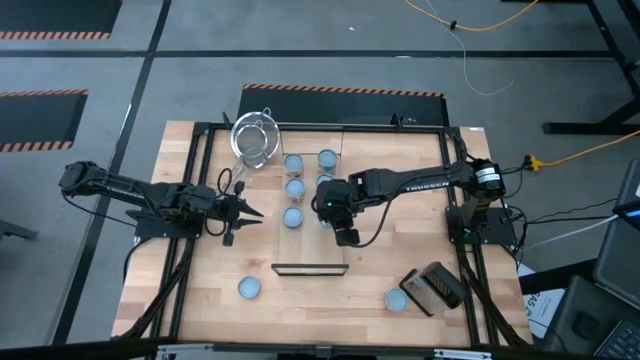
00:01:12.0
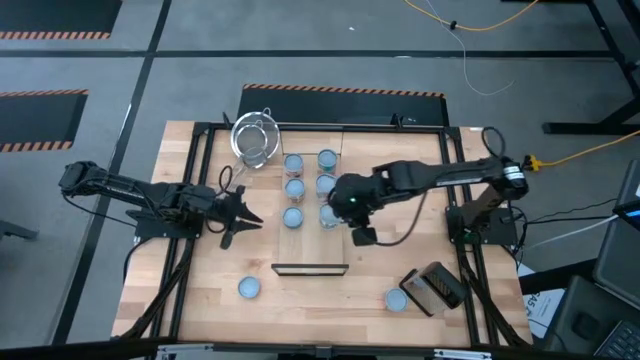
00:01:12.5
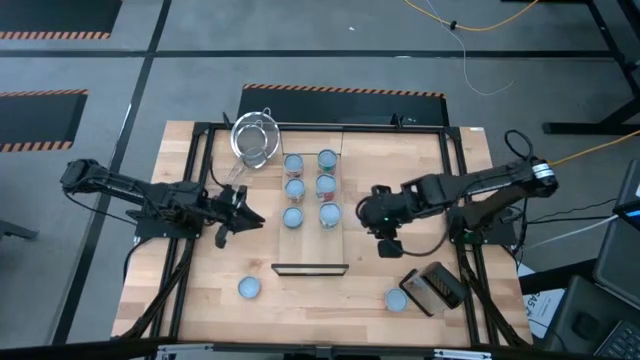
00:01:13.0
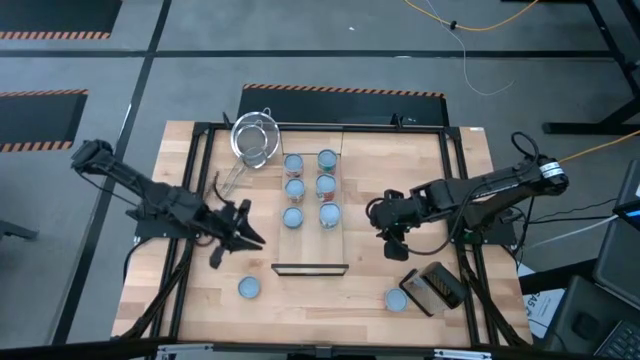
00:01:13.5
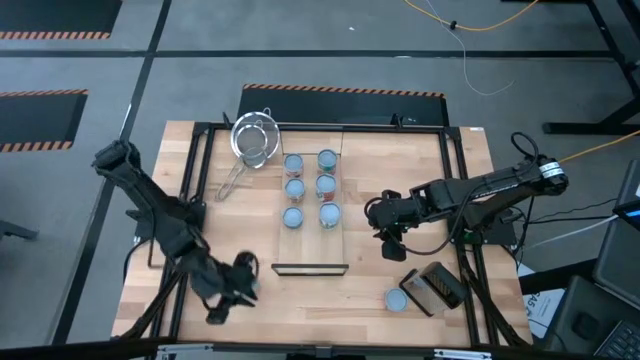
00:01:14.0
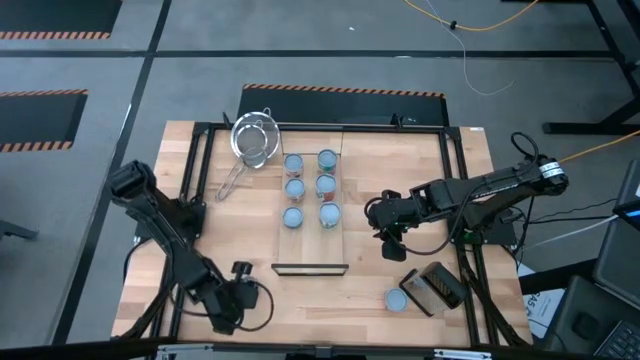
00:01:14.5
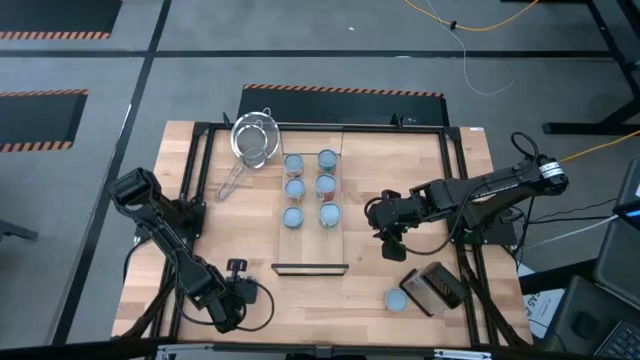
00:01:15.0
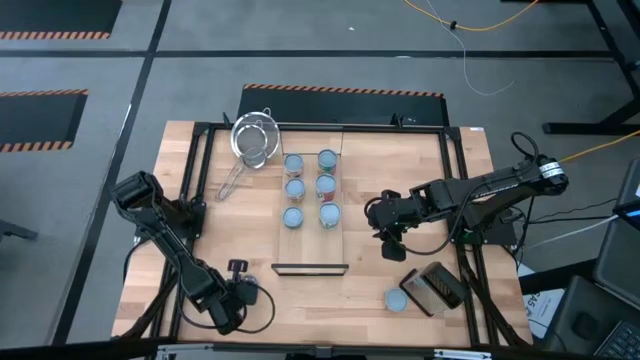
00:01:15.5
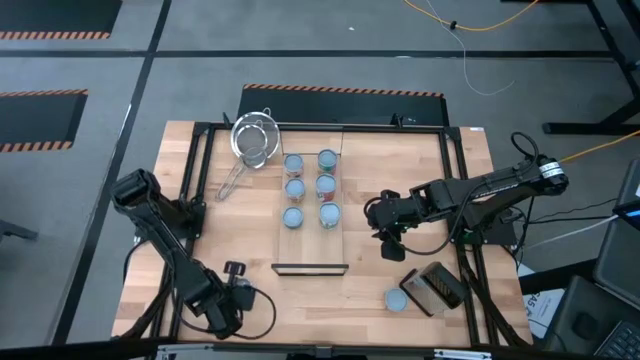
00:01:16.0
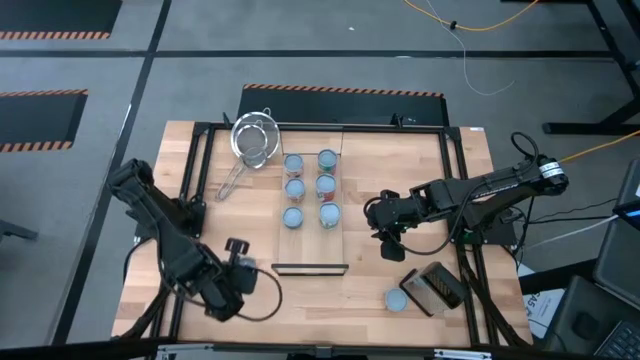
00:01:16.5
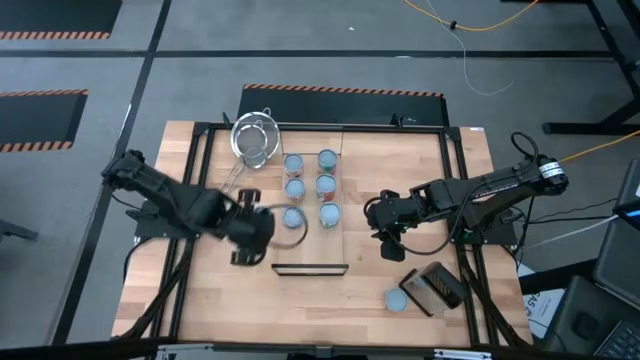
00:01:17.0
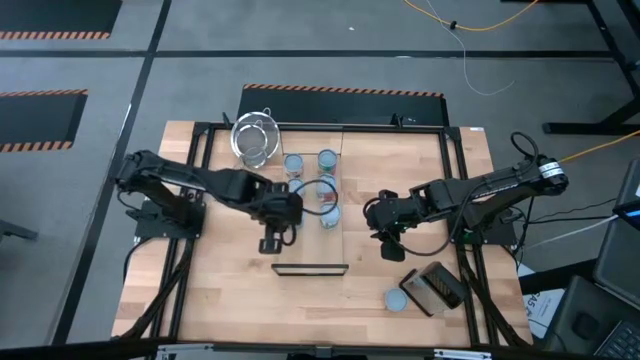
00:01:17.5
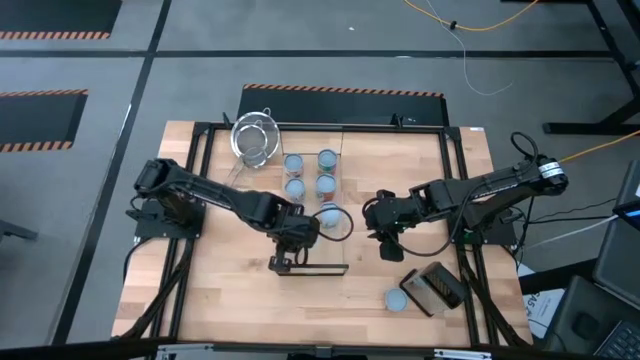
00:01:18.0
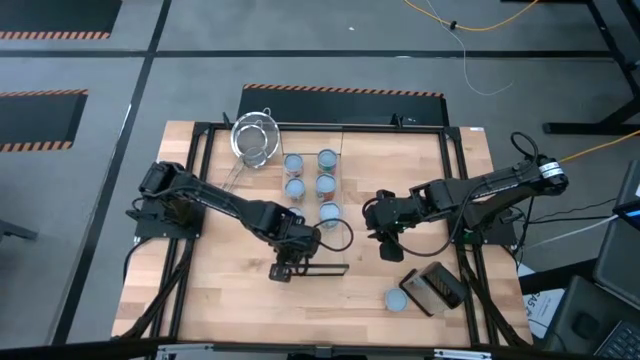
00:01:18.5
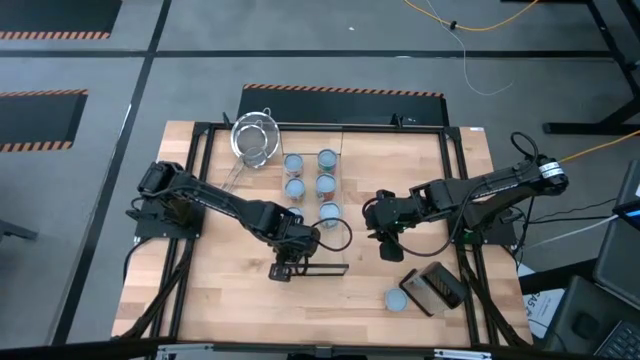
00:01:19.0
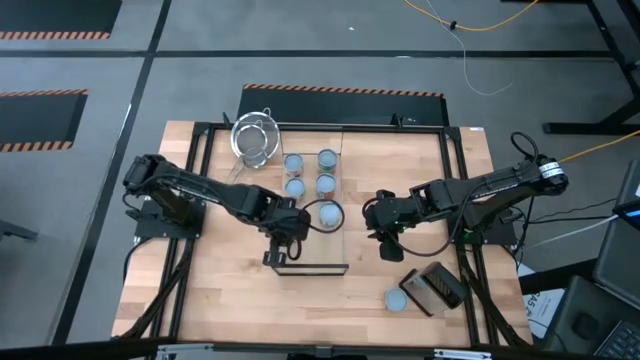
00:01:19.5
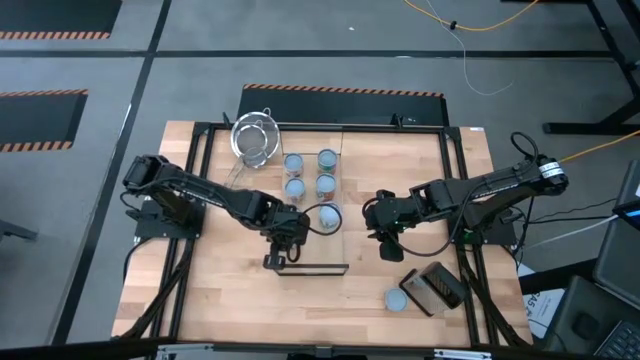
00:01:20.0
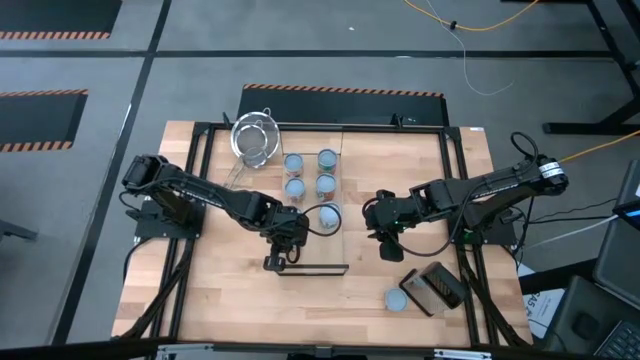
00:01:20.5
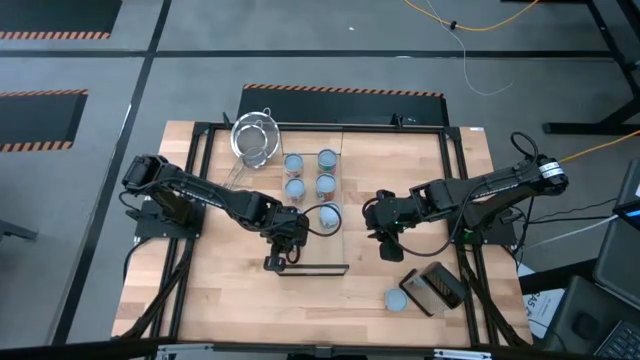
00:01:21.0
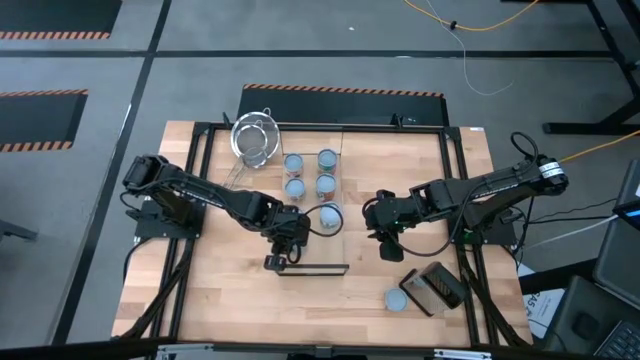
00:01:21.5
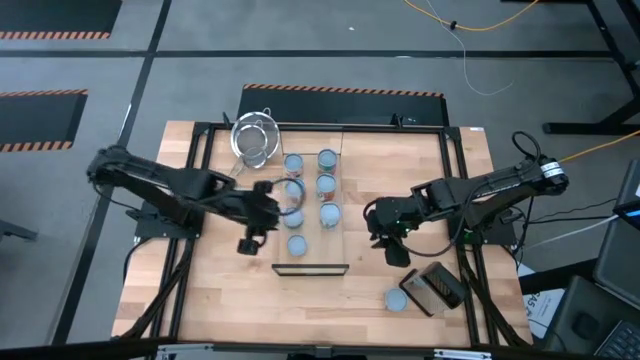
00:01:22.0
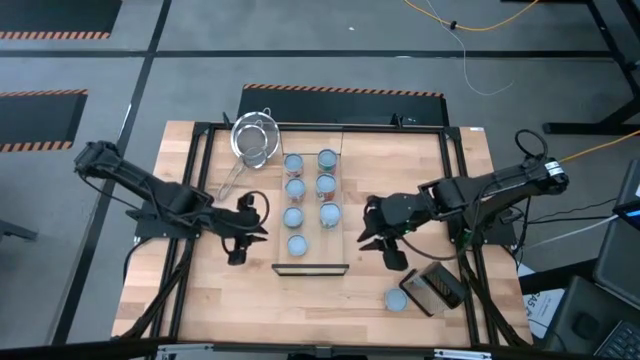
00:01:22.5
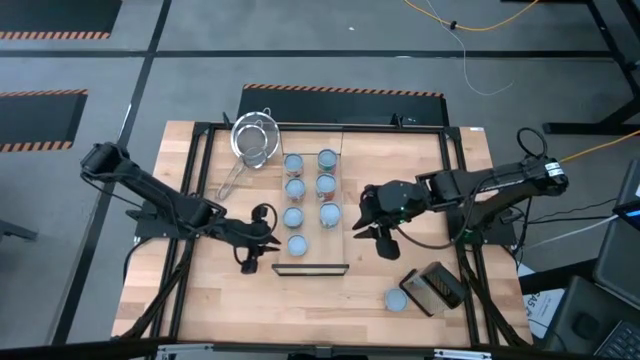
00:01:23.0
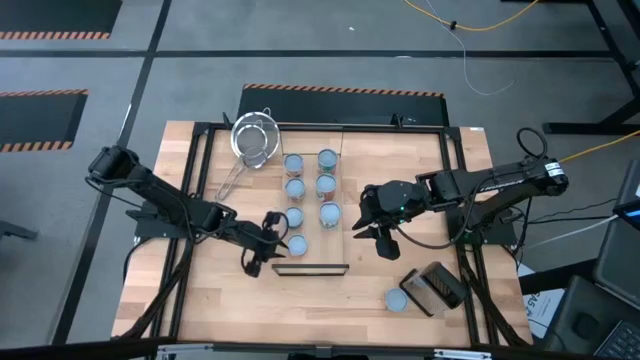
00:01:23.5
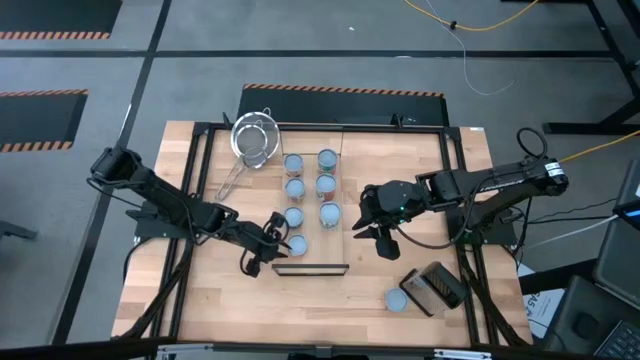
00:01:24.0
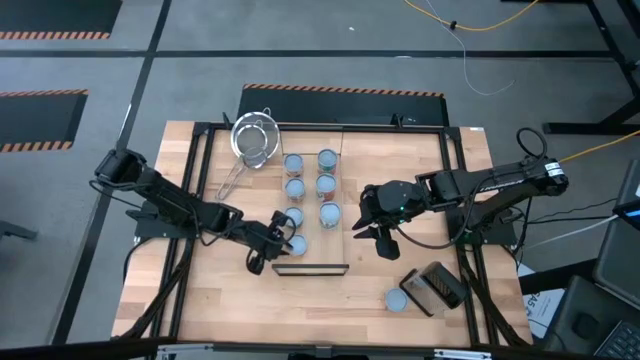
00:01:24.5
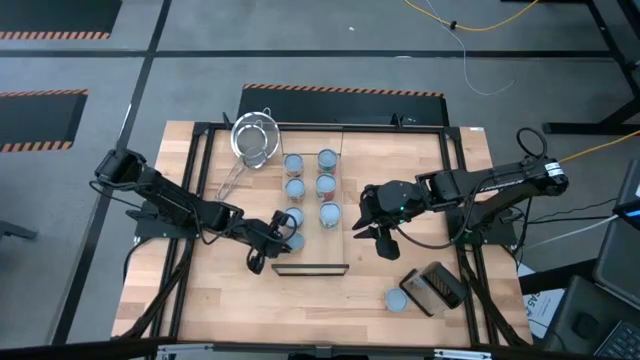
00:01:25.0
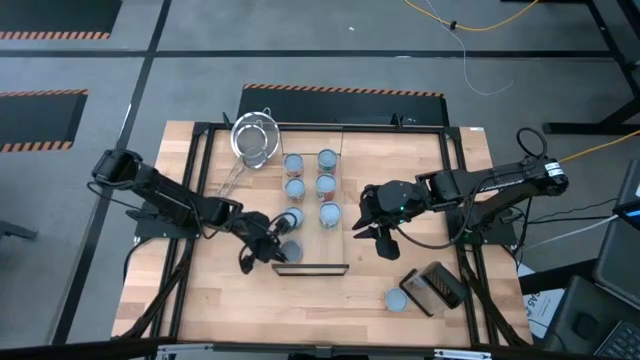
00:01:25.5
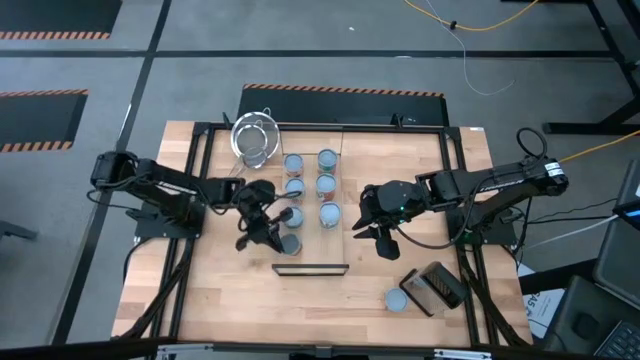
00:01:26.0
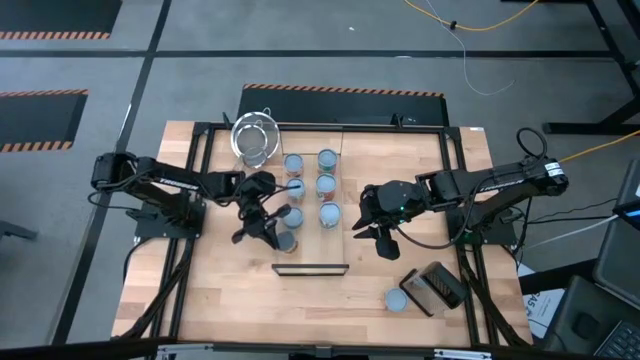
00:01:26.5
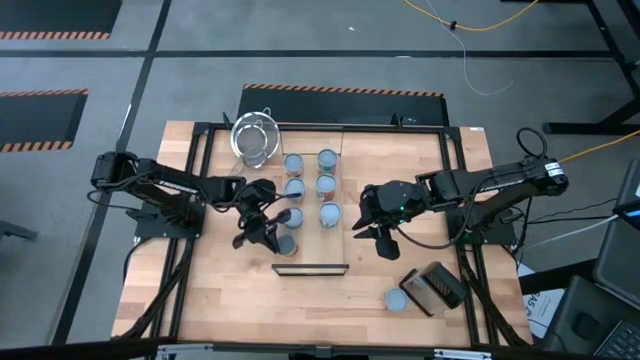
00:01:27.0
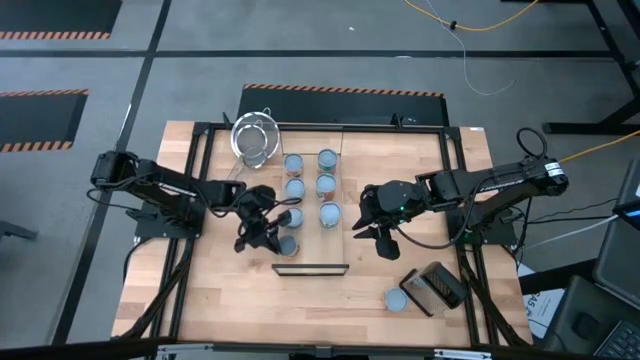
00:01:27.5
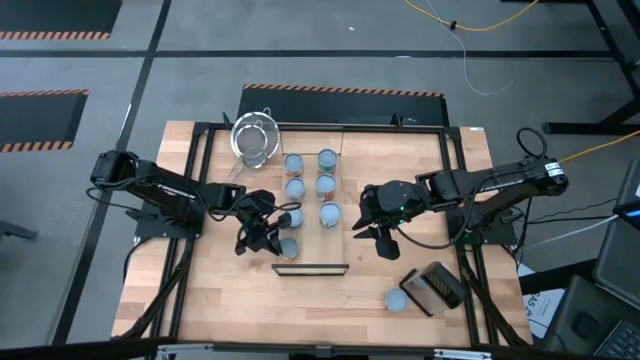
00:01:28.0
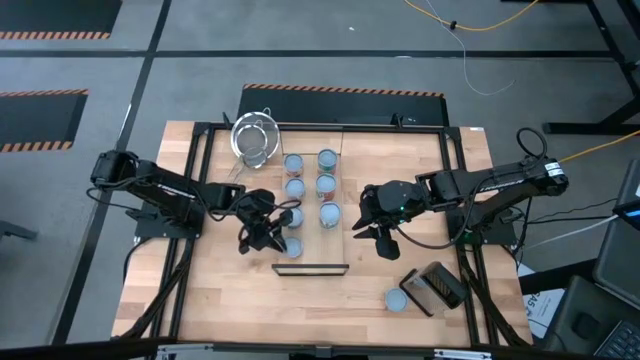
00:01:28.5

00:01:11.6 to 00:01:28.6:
Task: Pick and place cans onto a shelf
Put the canned pineapple rings on the shelf

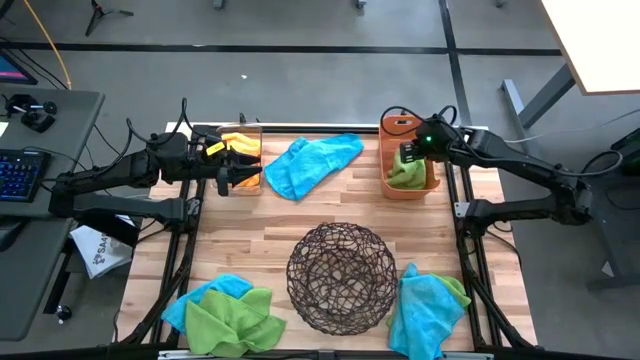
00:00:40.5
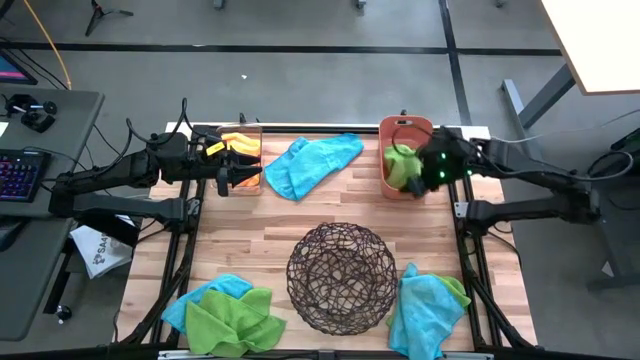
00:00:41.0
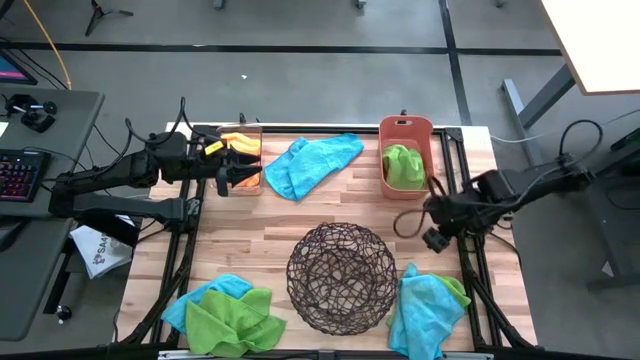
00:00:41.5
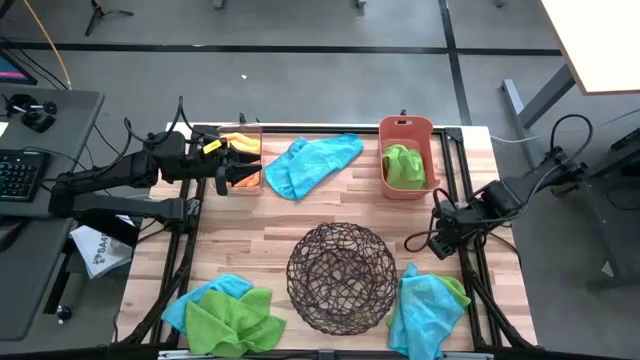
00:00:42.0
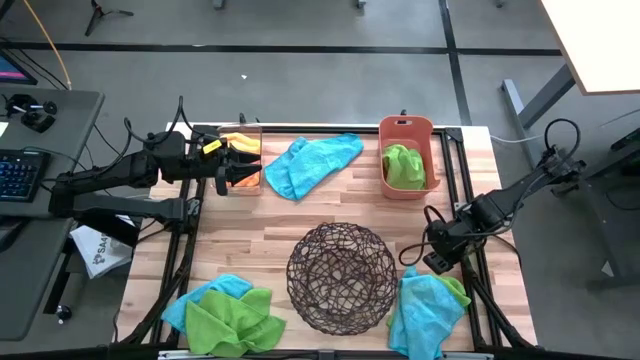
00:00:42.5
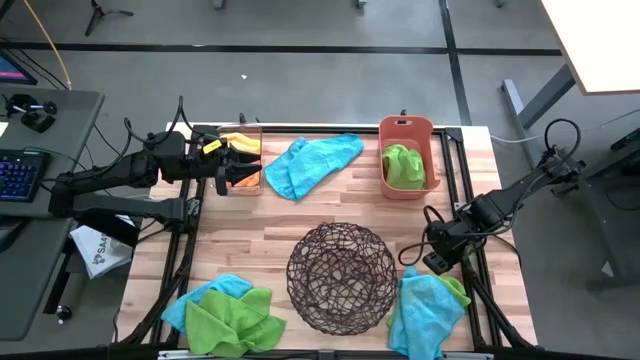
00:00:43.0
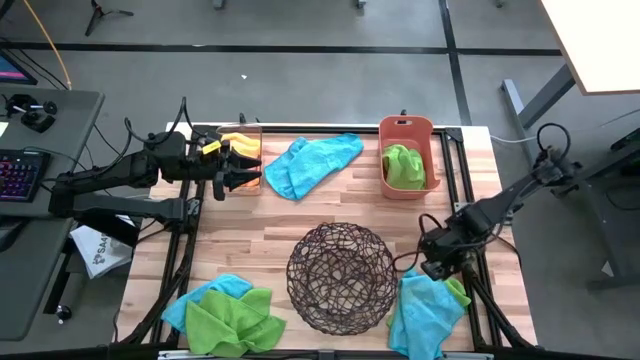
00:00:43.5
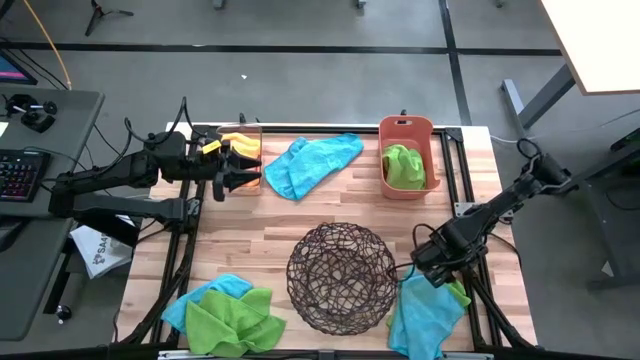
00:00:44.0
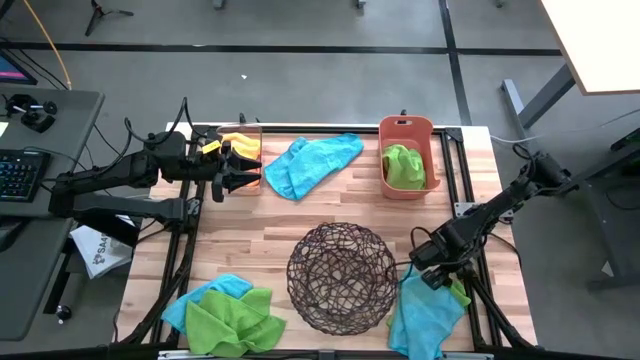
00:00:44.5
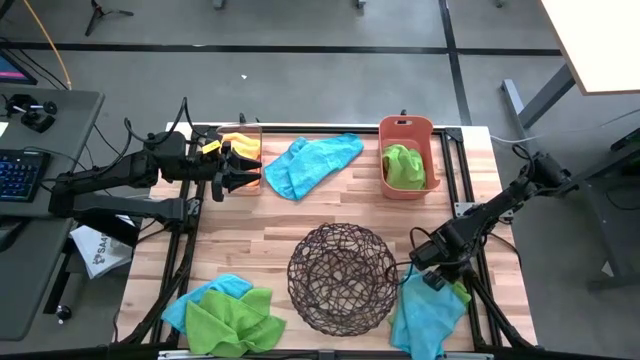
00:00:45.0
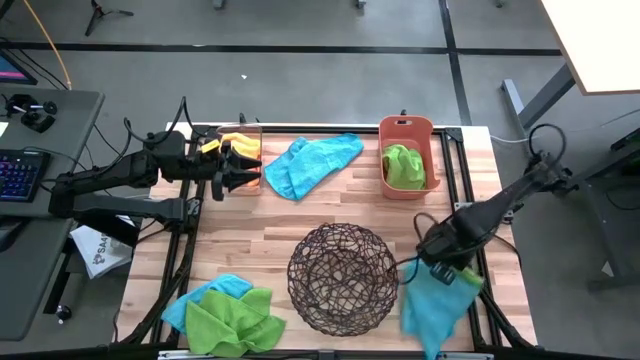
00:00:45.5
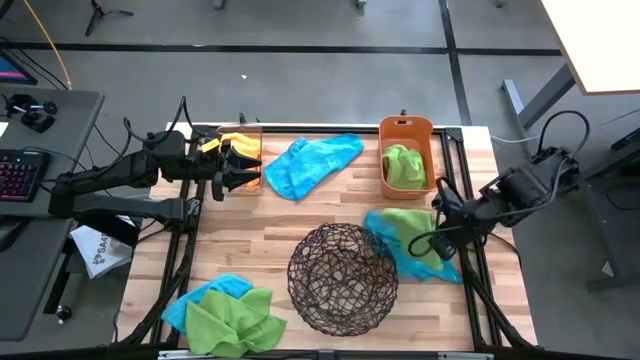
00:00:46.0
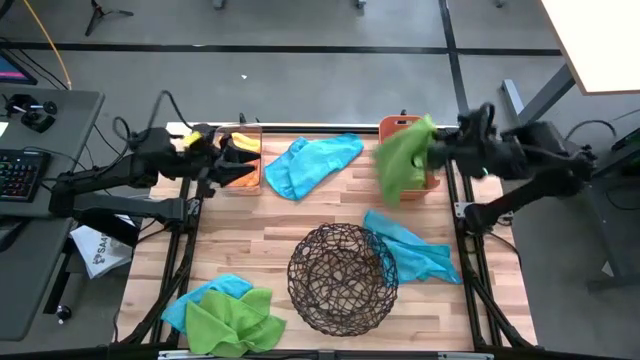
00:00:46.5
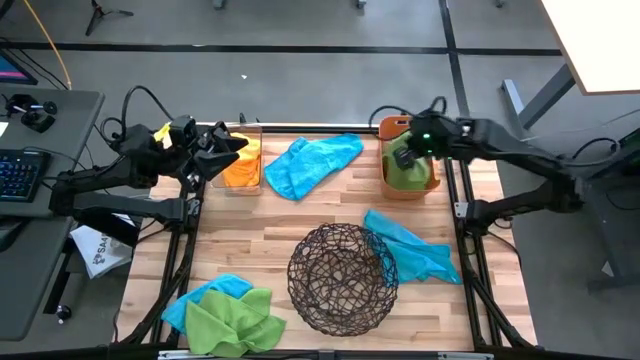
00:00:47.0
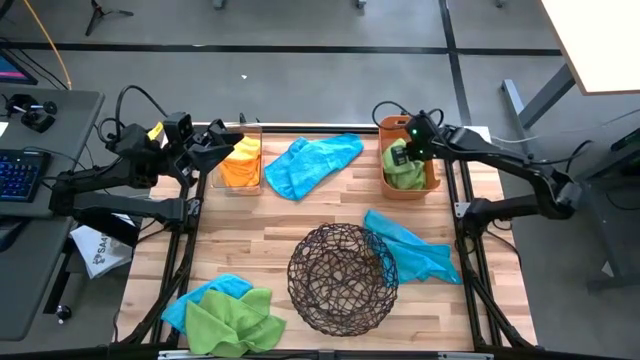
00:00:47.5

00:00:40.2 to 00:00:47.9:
Task: Sort microfiber towel by color & place in baskets
Put the right green towel into the orange bin
